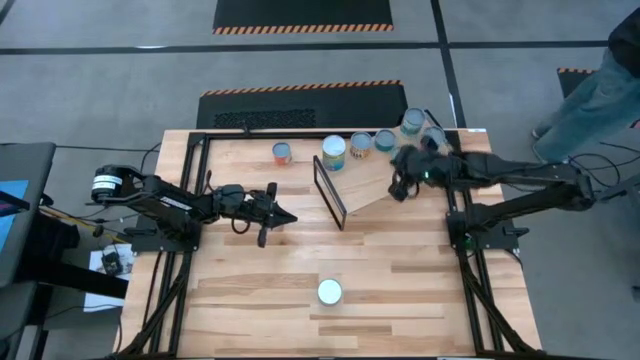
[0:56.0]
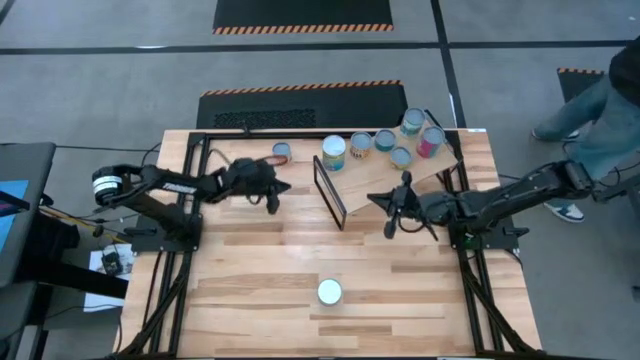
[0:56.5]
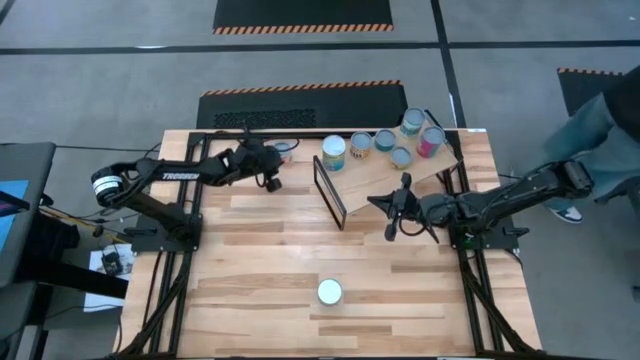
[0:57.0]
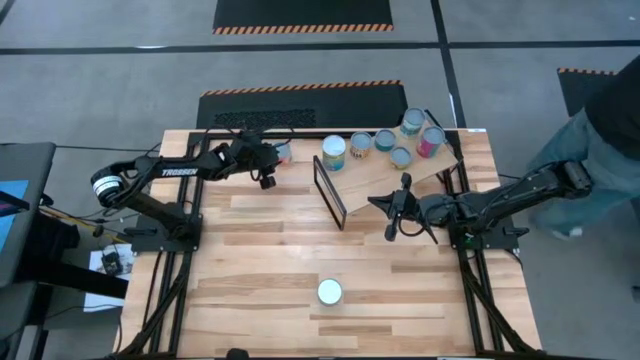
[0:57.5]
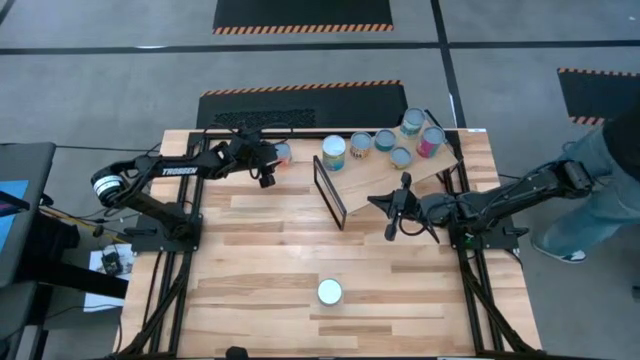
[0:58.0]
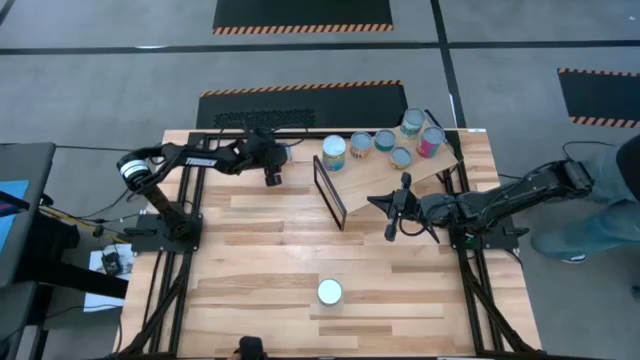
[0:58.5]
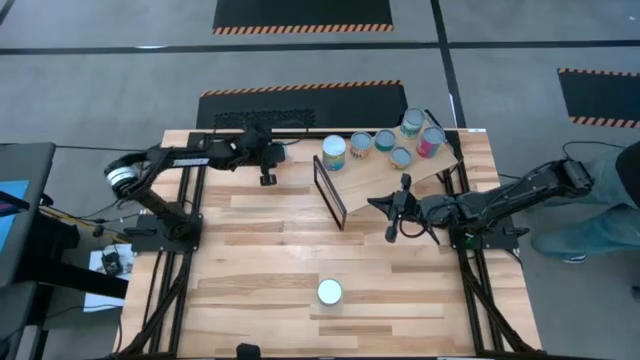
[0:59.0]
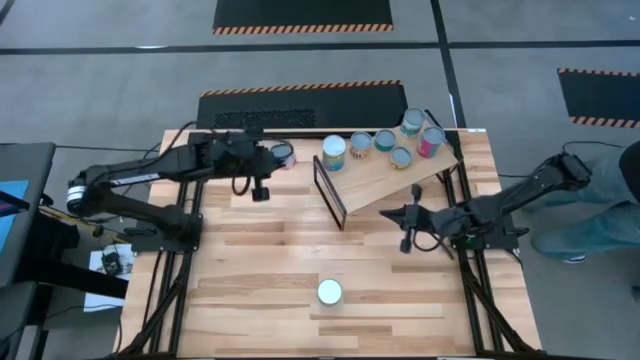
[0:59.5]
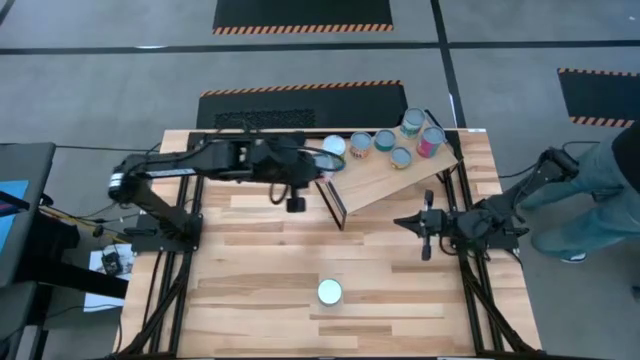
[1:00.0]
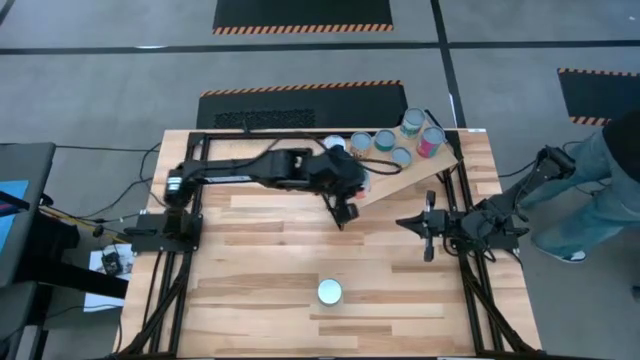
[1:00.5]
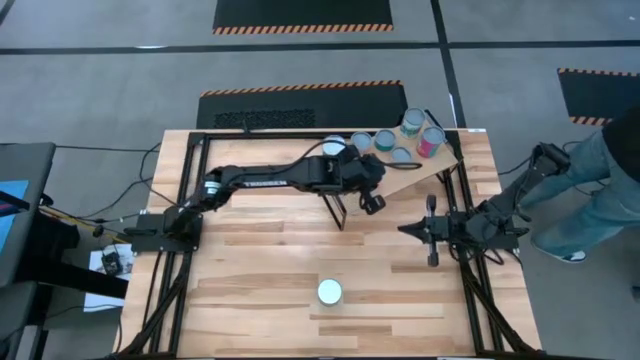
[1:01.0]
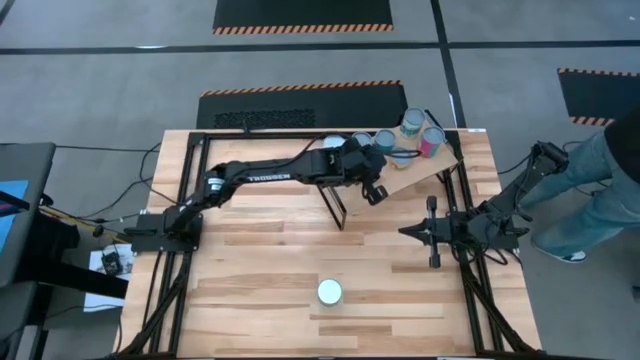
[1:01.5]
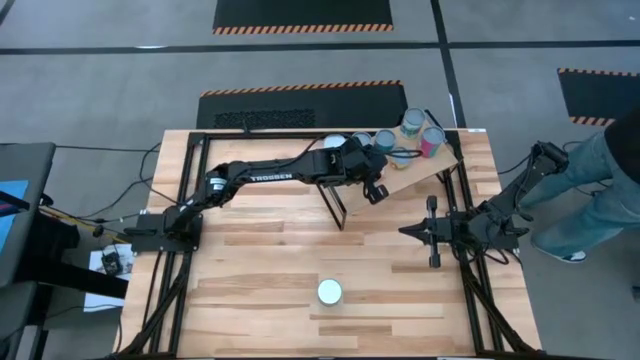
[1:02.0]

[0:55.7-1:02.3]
Task: Pick and place cans onto a shelf
Put the can of pasta on the shelf

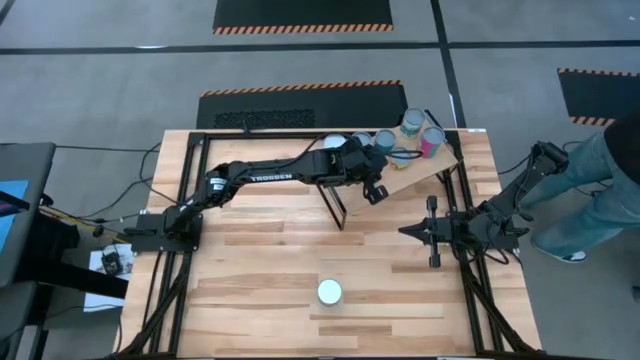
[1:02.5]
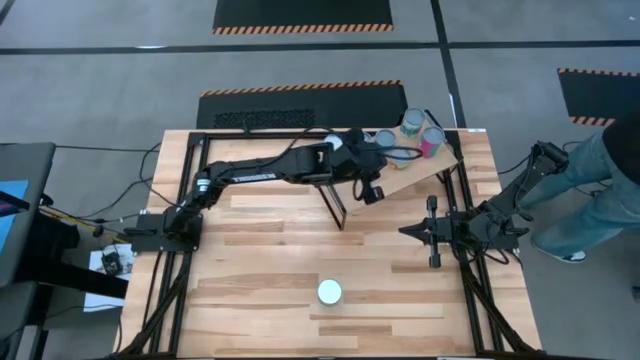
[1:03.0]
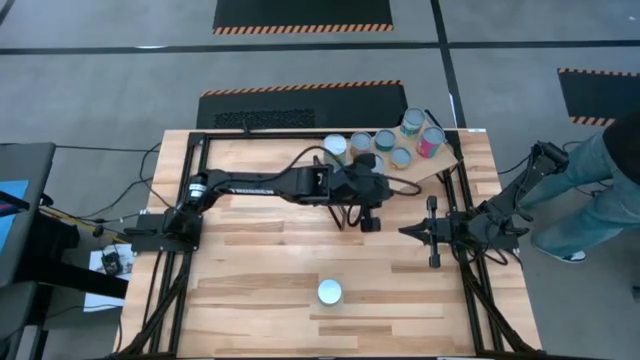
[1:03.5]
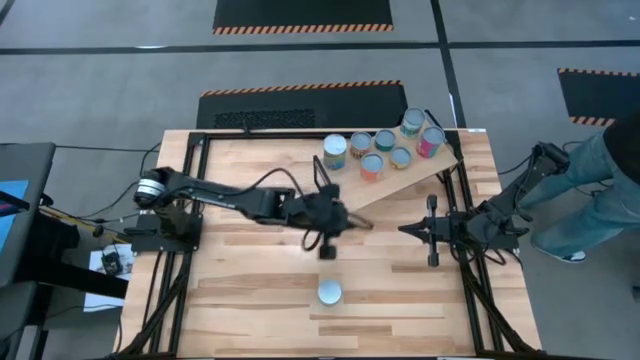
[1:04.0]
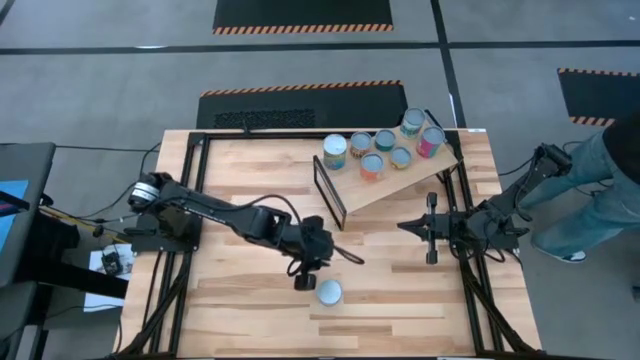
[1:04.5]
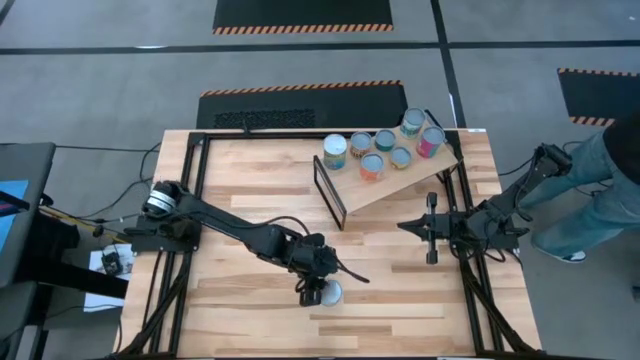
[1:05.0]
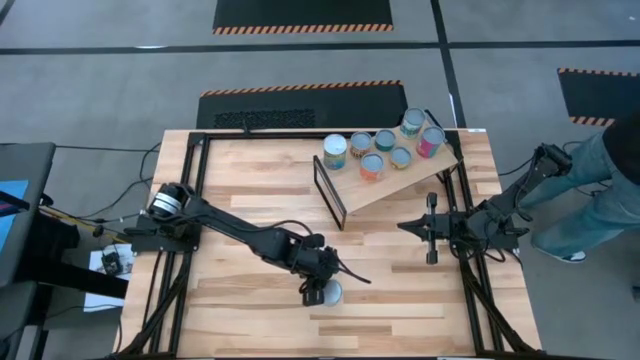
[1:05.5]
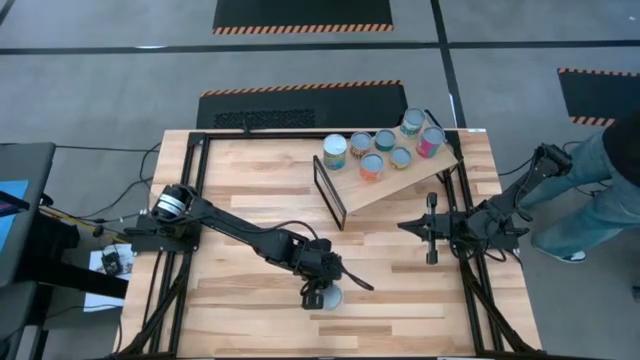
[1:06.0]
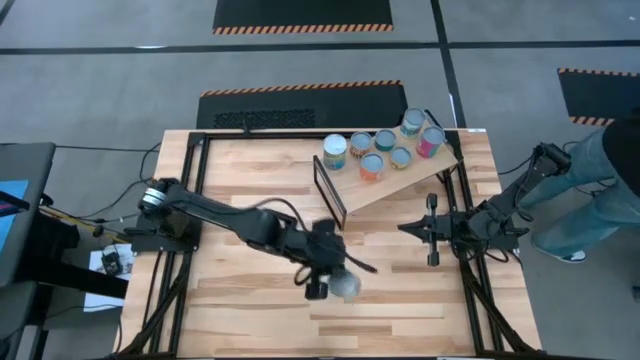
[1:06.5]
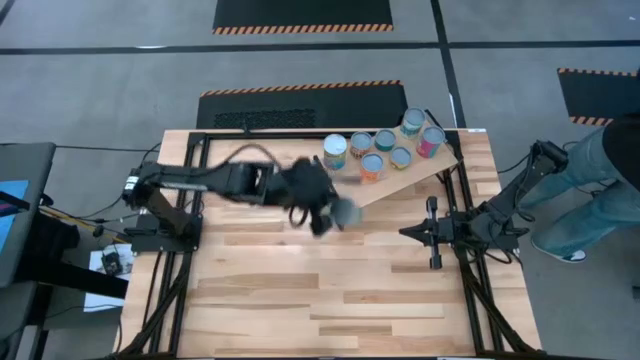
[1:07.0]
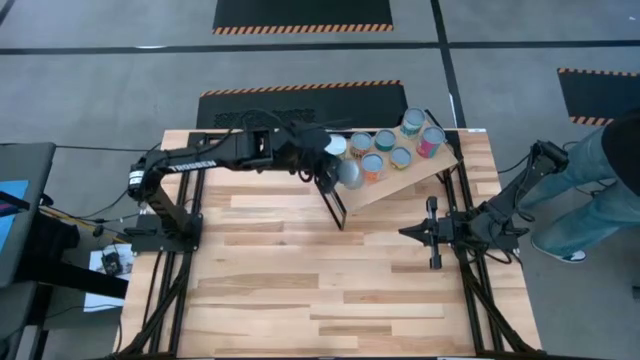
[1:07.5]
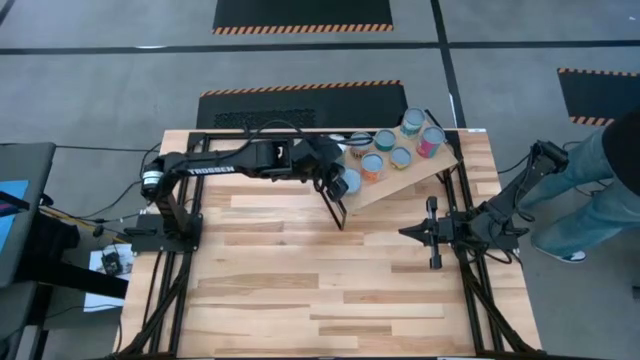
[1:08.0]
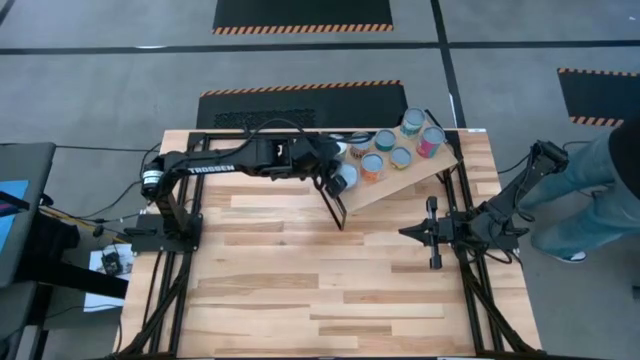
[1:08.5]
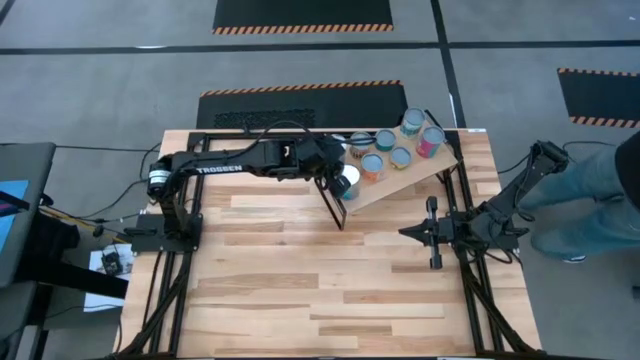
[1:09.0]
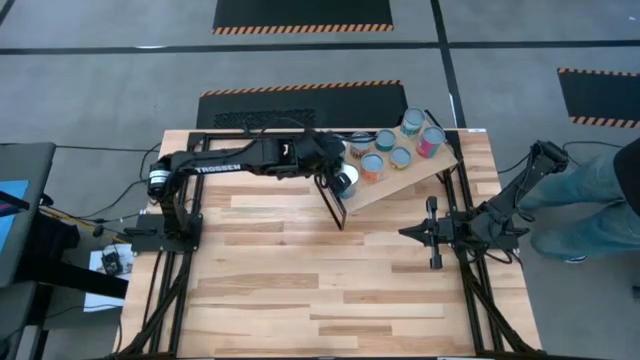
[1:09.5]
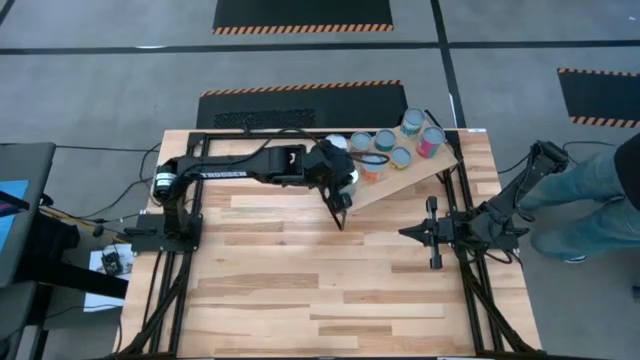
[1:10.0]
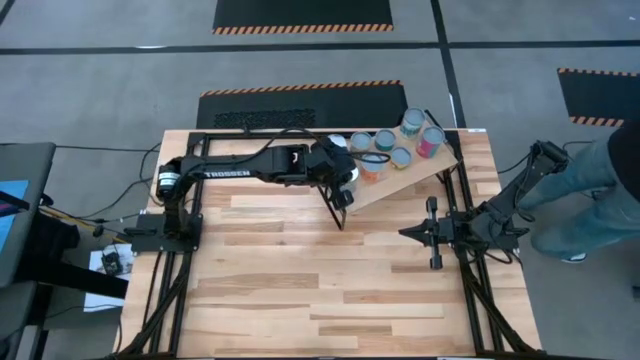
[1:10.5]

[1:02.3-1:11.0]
Put the can of cherries on the shelf

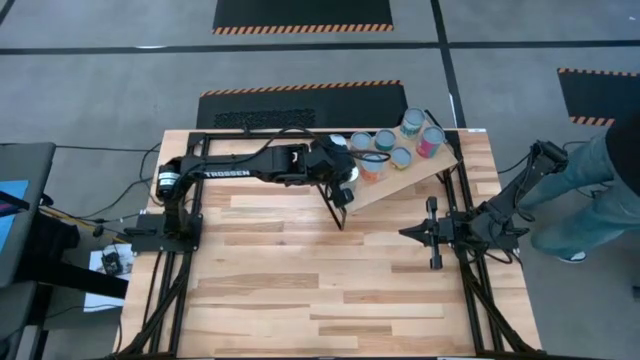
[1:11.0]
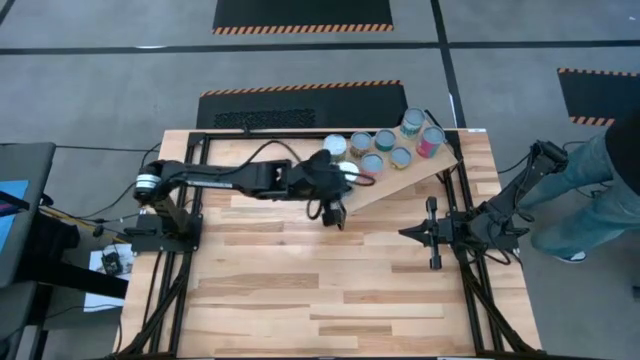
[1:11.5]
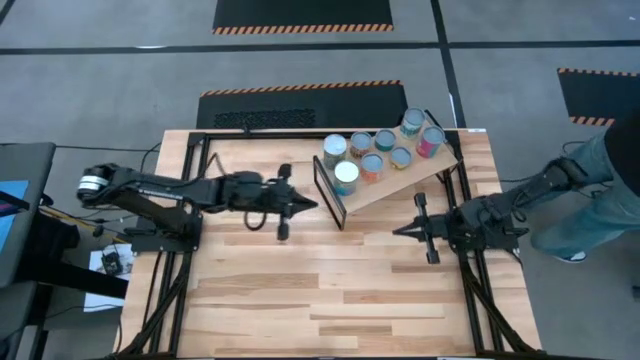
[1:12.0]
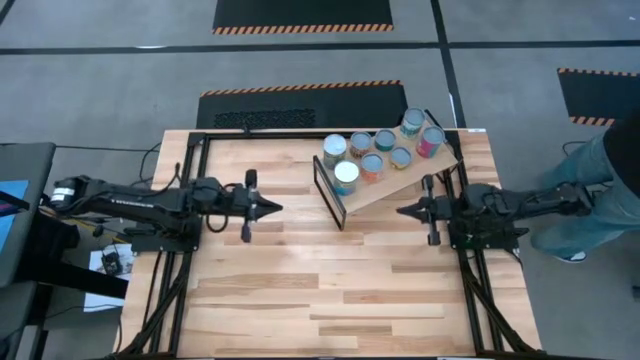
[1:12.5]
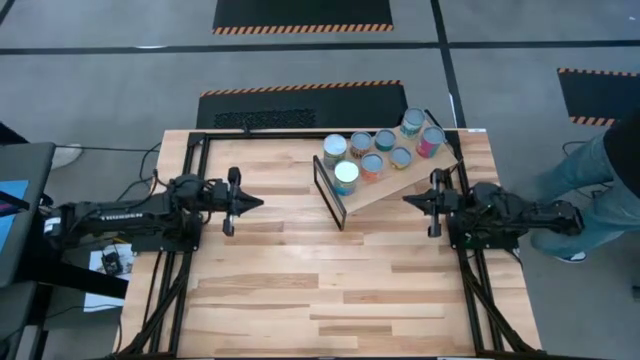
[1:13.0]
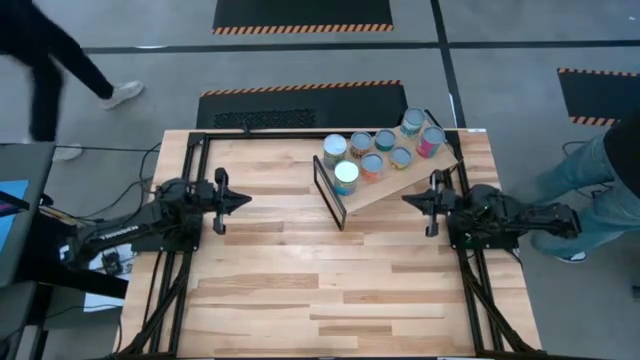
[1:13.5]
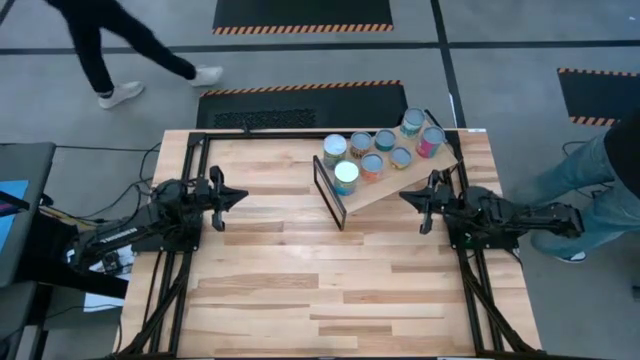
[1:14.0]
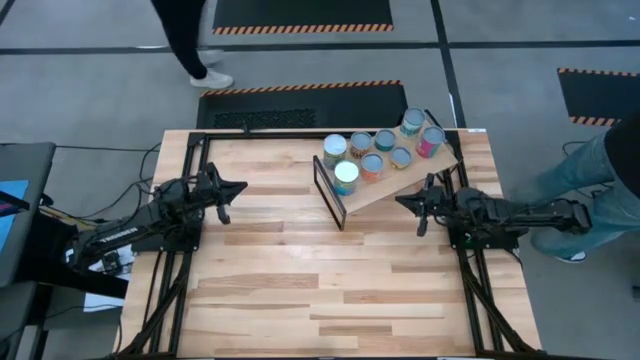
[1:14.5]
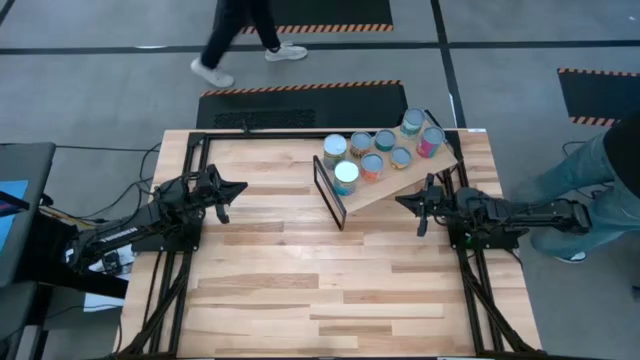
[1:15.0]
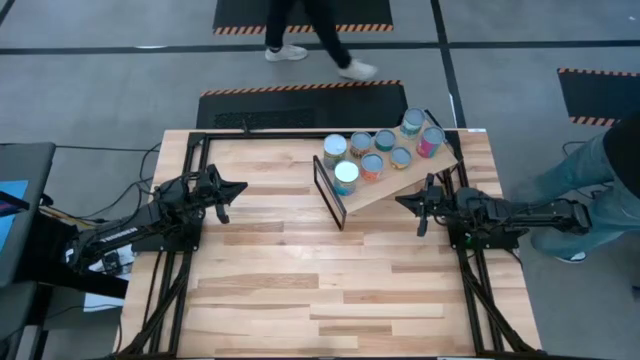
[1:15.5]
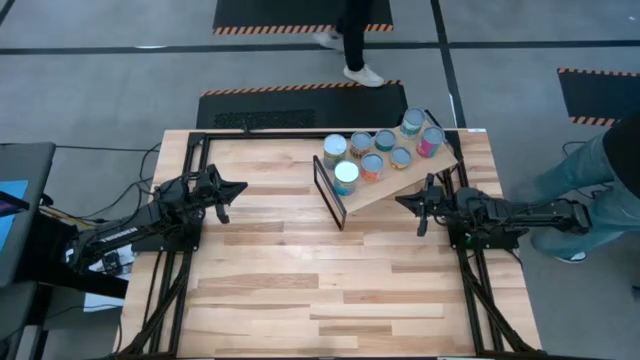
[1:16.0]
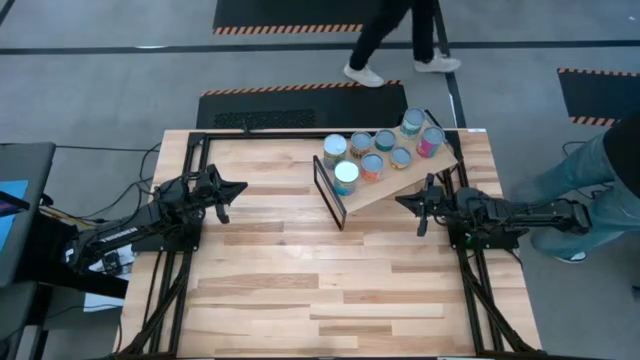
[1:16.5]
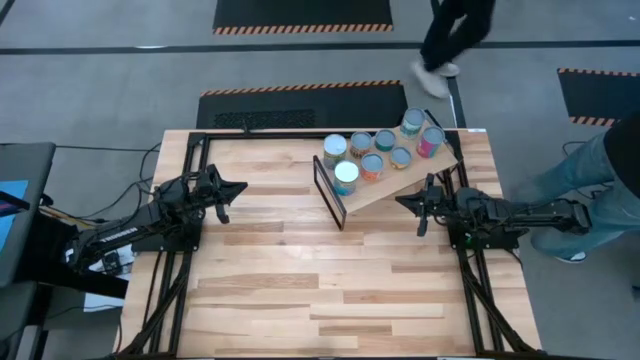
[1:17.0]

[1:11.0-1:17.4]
Return to Home Position
